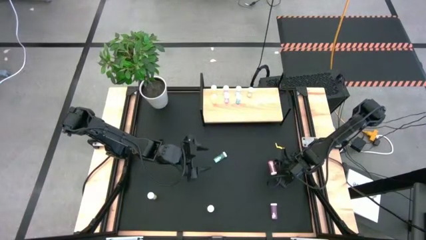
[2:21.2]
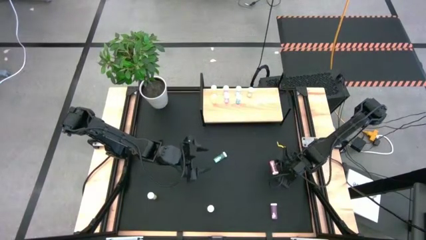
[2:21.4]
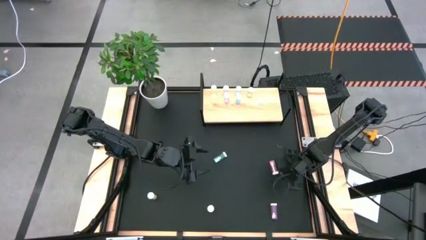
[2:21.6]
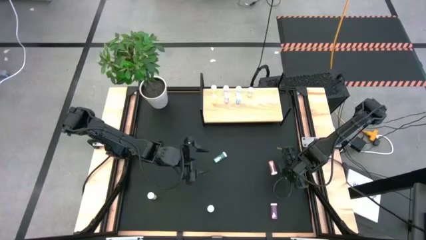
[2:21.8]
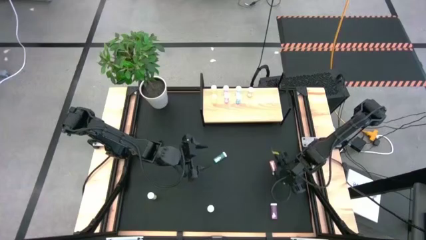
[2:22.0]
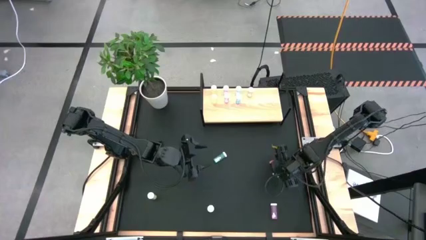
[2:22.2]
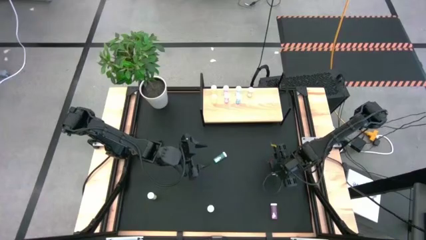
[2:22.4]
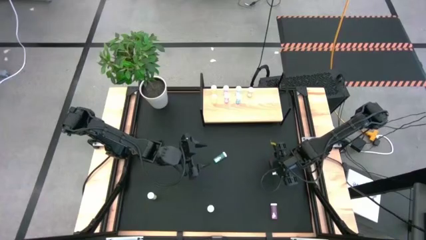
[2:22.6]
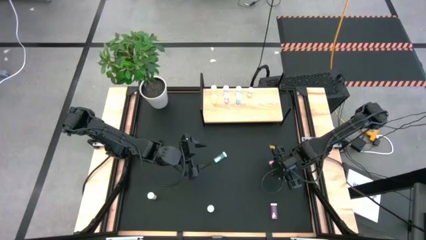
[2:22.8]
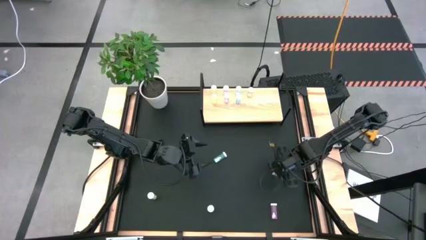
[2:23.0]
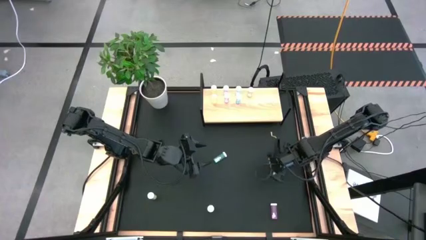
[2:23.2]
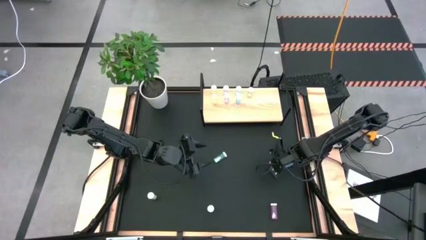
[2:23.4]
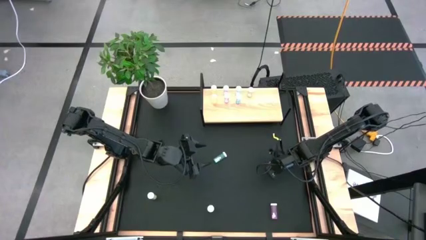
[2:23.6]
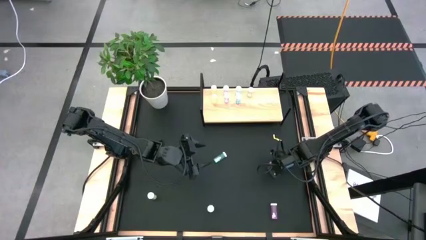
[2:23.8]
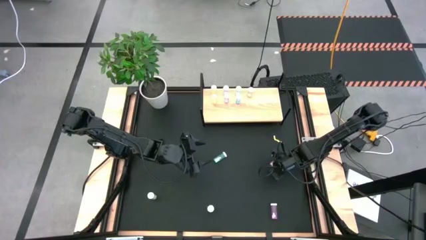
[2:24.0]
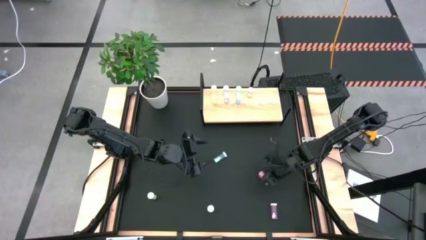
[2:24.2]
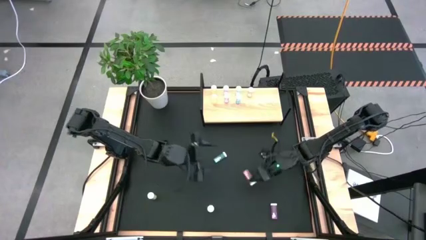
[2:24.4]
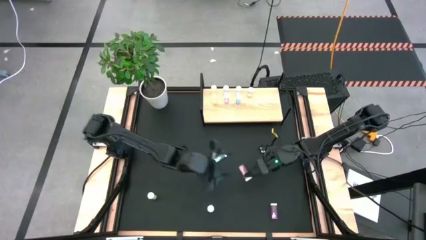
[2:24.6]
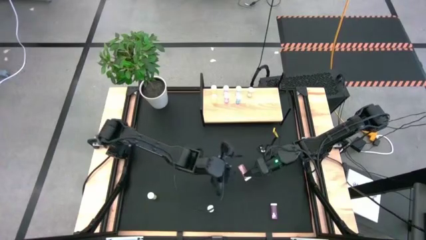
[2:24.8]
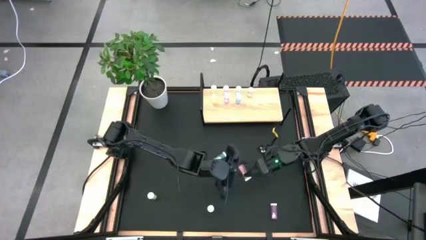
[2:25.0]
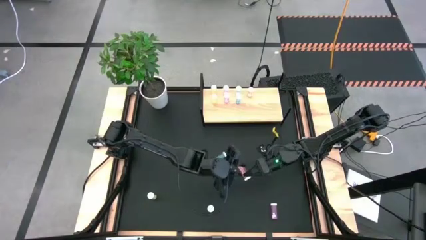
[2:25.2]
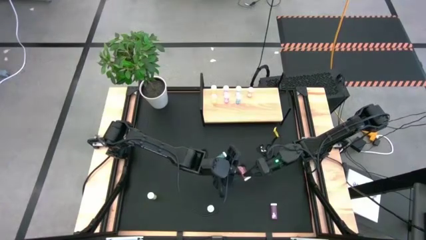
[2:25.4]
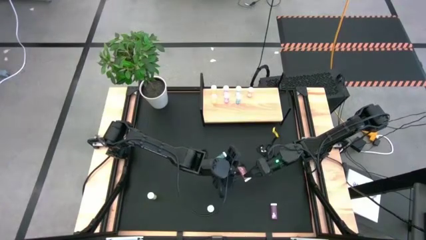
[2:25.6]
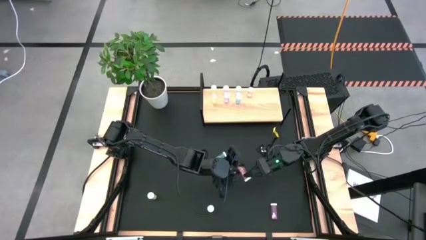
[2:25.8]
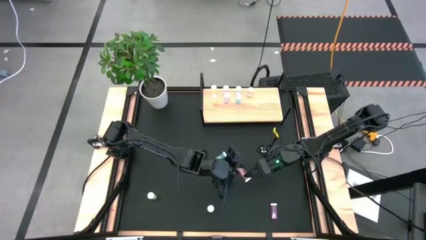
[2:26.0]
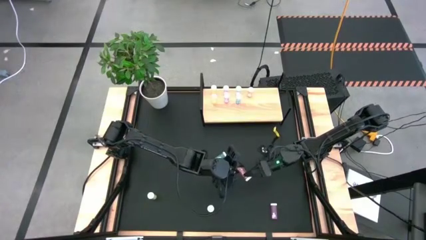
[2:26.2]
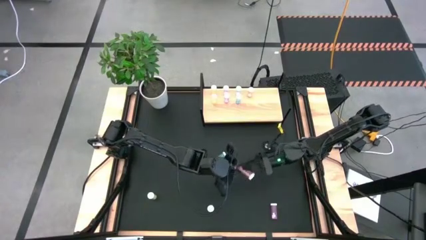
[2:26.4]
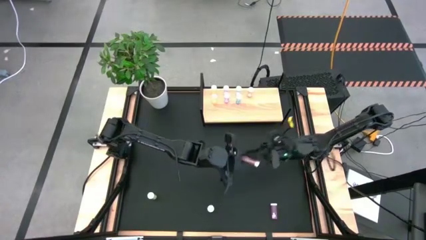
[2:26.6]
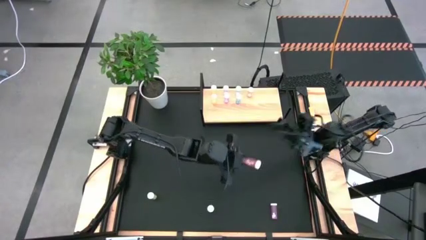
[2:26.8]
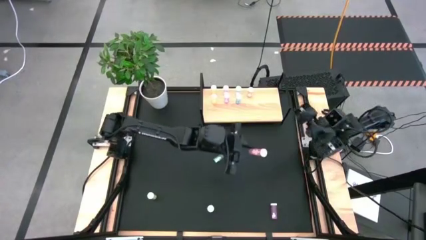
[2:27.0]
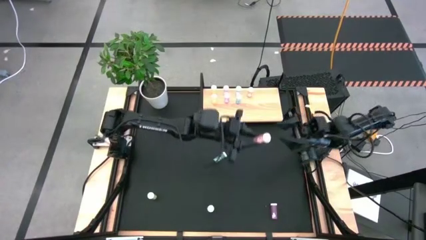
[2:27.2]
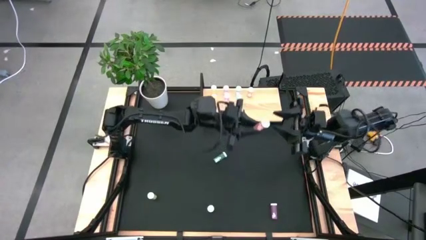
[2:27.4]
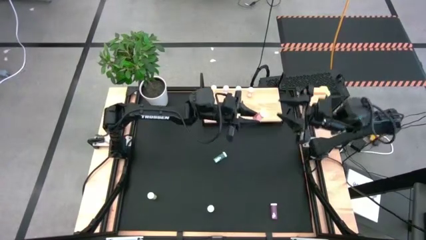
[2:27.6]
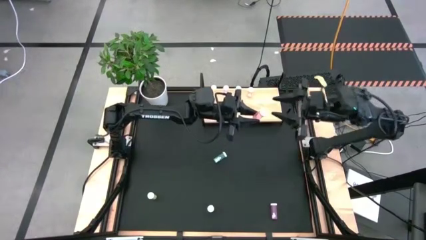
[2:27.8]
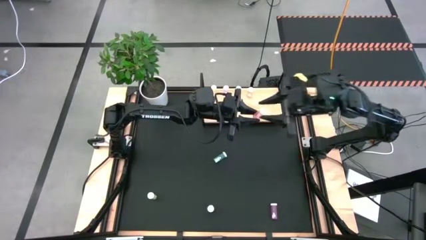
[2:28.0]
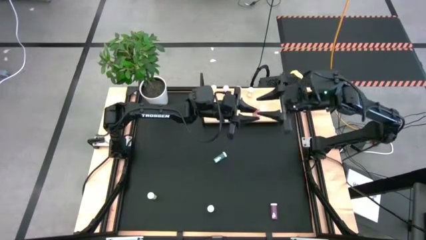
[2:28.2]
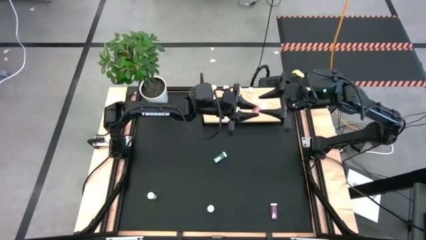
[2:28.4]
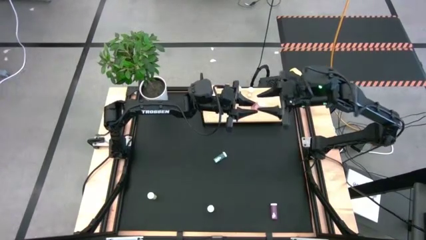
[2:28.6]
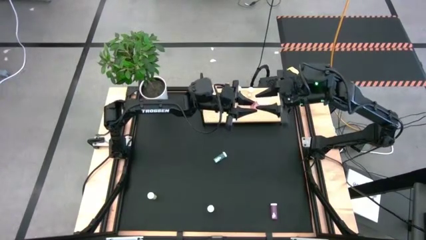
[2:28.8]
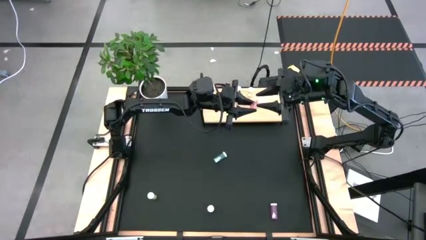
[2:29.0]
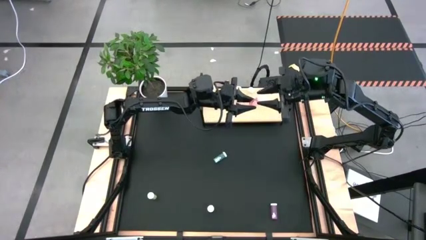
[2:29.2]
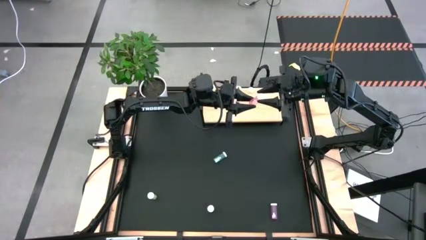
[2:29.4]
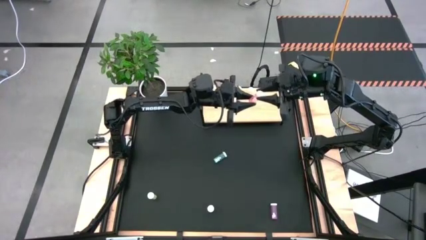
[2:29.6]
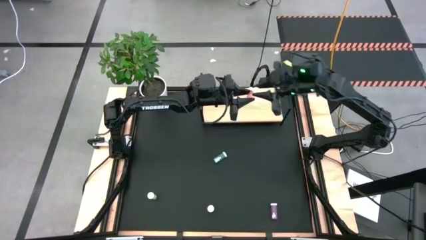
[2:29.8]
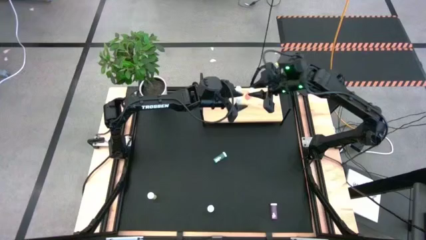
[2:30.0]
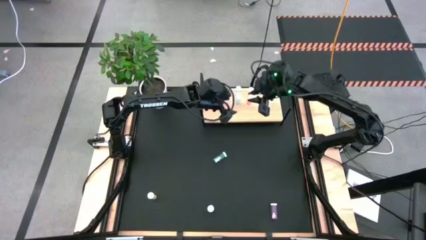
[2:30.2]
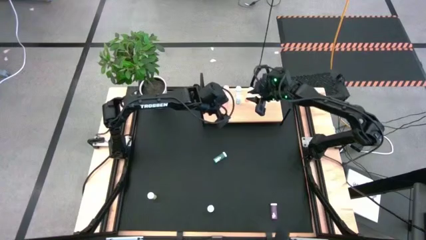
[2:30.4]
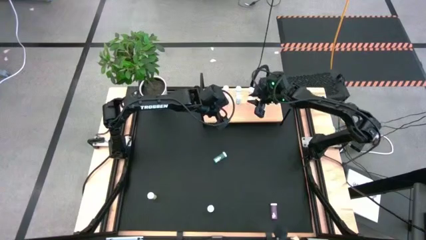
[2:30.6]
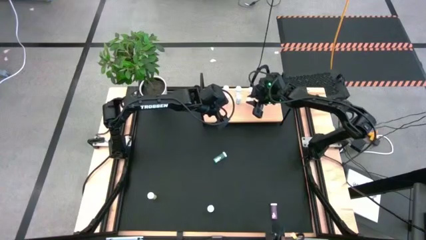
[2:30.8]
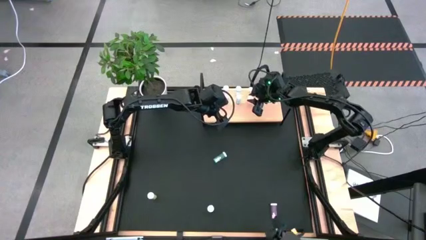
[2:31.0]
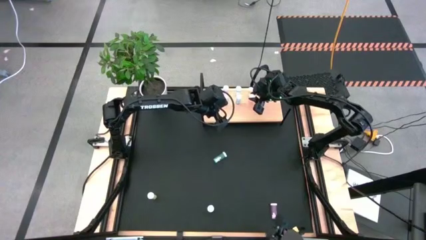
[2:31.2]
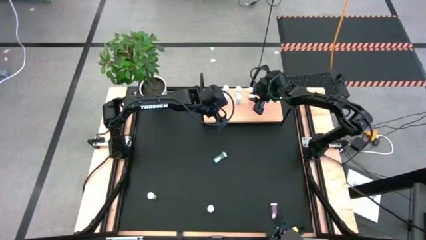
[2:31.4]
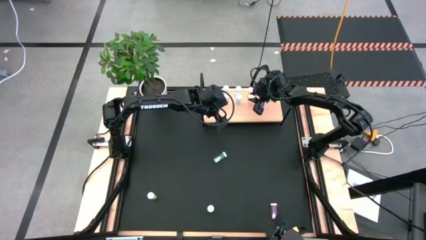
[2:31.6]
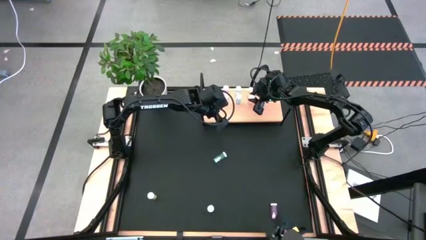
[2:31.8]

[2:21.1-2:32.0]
Task: Pick and place medicine bottles onto shelf by color
Put the top orange pill bottle on the shelf aligned with the other orange pill bottle

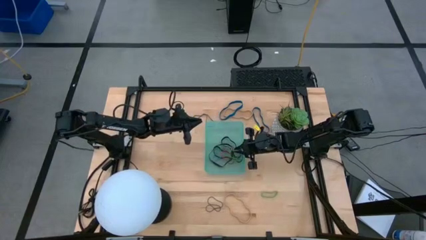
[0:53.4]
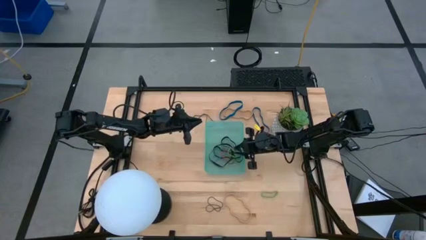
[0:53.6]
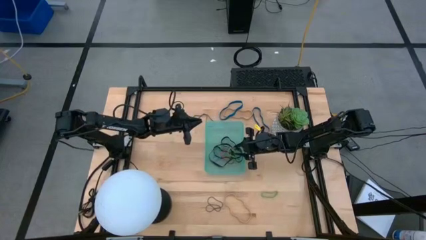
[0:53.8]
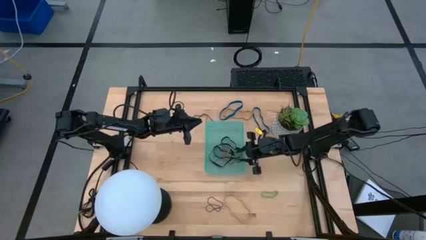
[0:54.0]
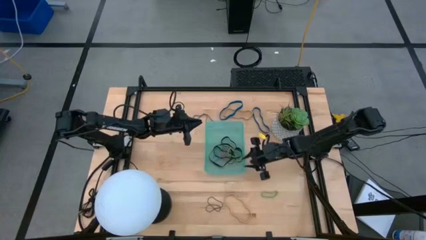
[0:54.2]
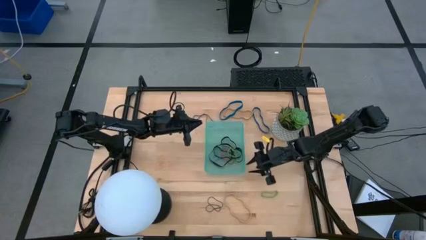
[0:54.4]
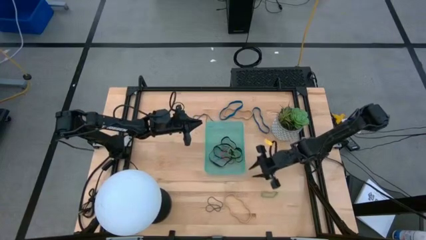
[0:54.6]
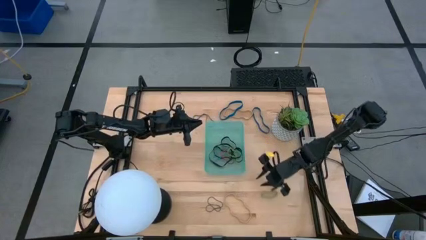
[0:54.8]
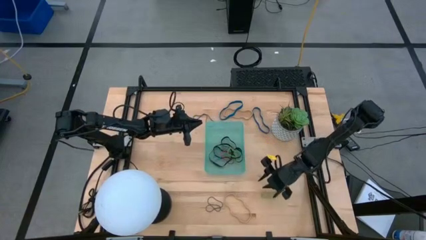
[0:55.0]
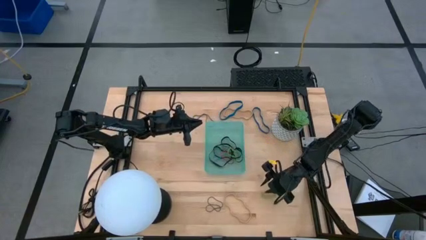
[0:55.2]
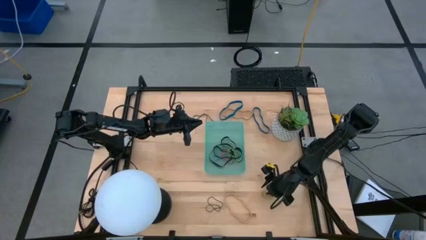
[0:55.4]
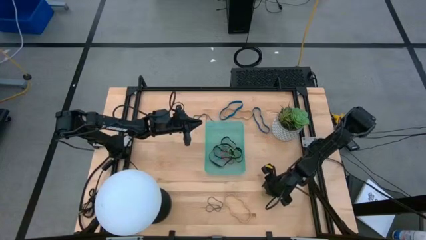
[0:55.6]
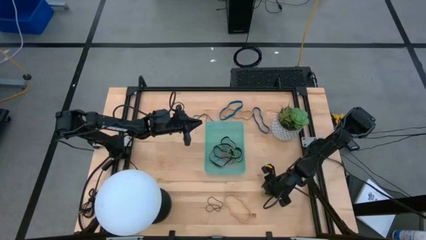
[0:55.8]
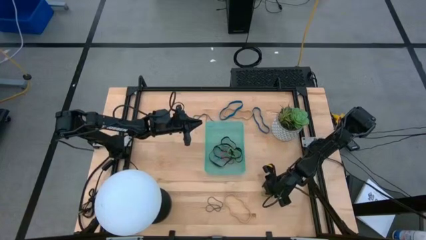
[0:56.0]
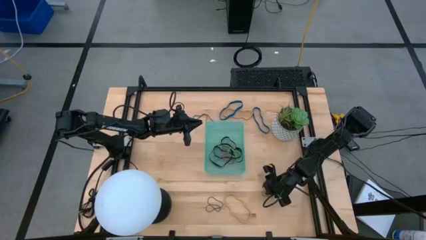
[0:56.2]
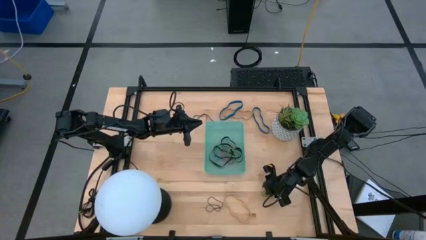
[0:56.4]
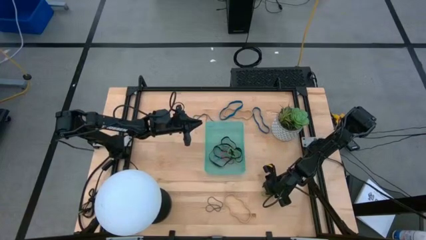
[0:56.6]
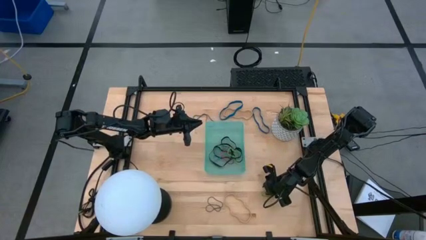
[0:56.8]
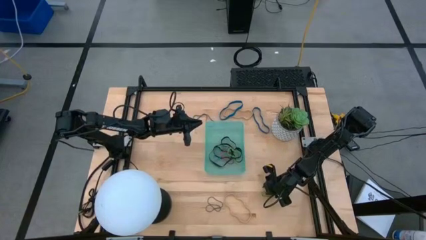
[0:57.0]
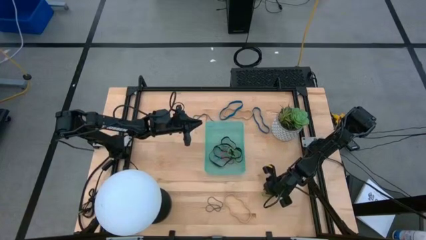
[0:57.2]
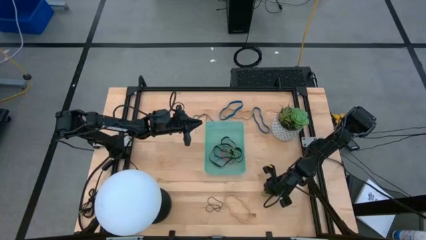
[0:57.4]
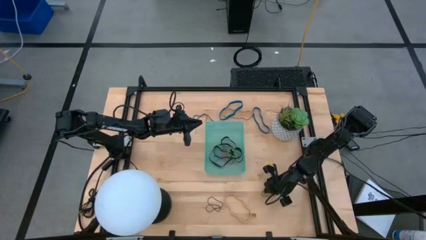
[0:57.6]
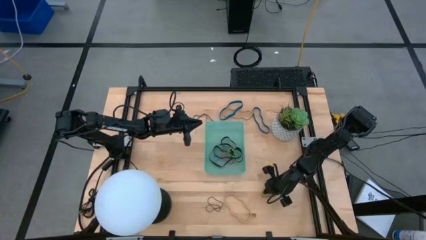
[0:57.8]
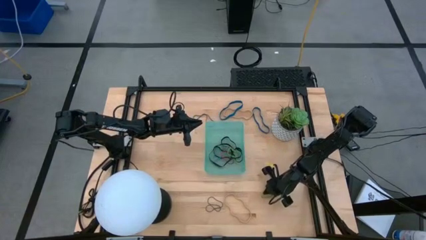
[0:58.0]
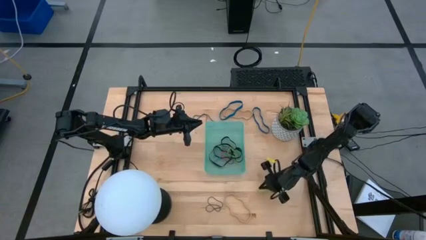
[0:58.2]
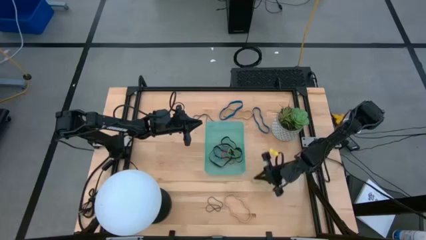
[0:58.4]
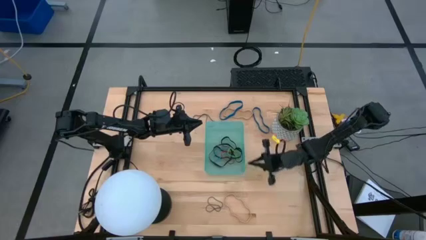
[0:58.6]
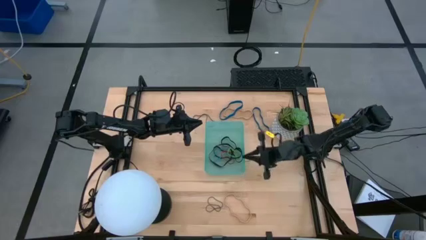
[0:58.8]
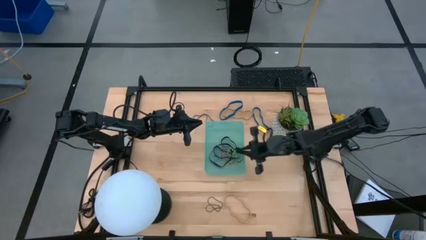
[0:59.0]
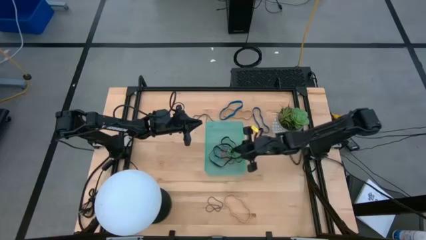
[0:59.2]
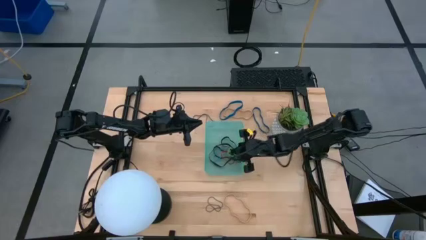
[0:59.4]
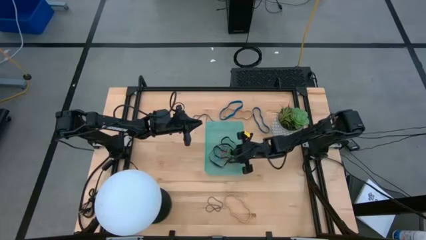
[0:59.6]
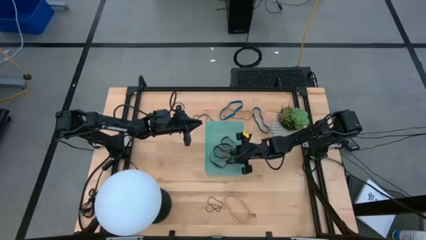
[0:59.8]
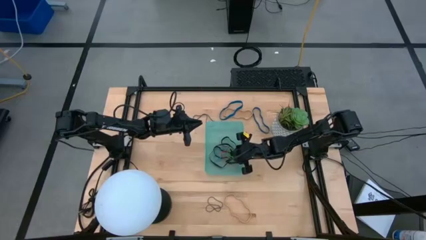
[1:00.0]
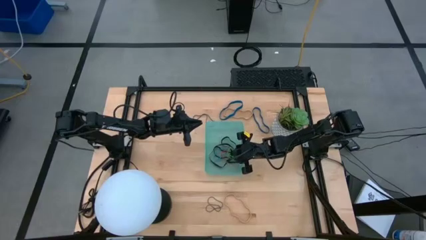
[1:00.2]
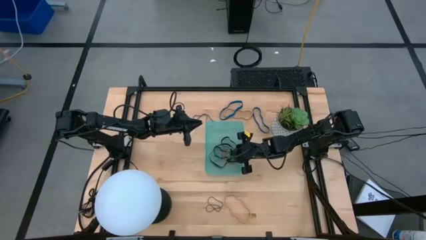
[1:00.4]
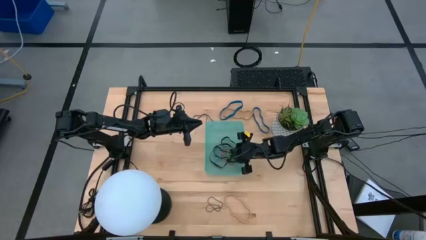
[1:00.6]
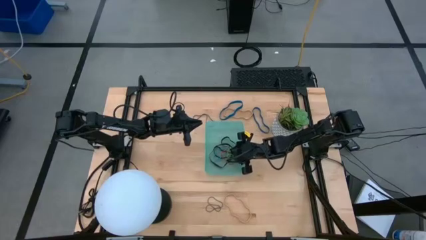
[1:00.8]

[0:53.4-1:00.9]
Task: Pick and place rubber bands into bin
Put the green rubber band into the green bin
